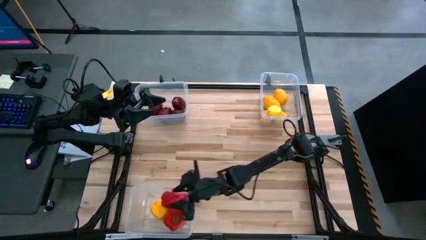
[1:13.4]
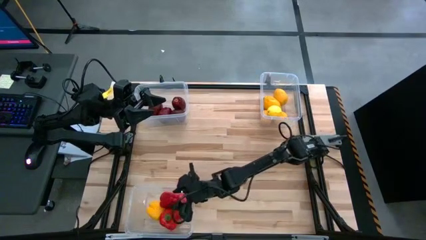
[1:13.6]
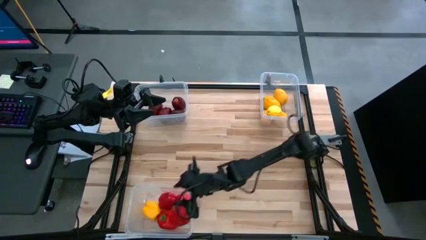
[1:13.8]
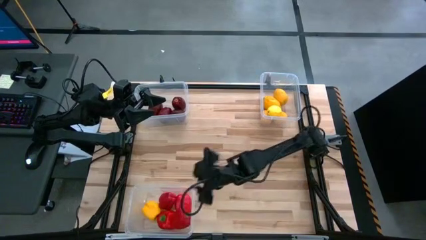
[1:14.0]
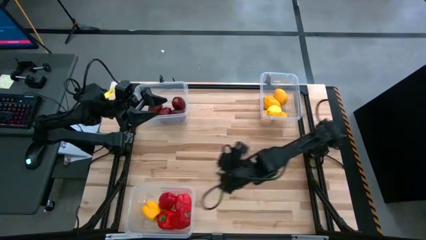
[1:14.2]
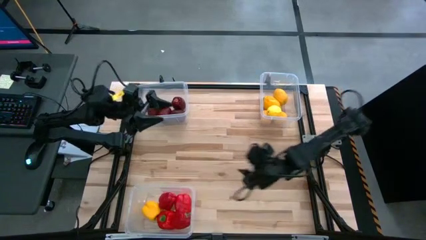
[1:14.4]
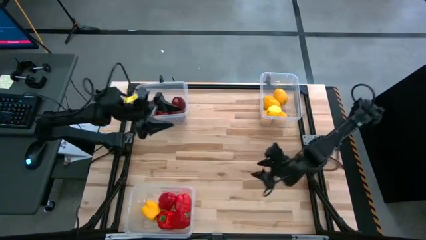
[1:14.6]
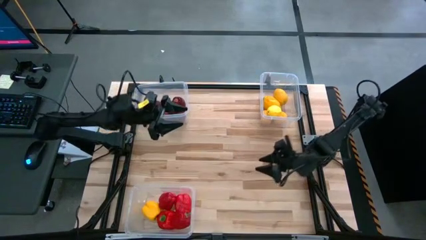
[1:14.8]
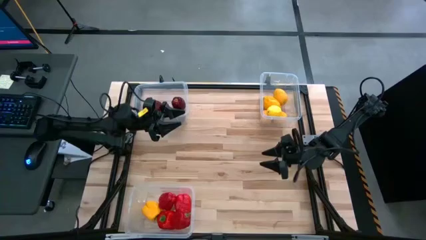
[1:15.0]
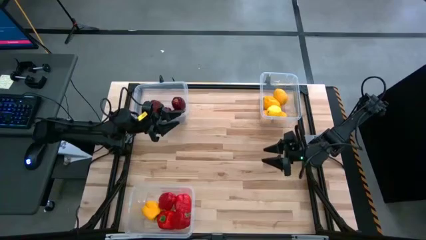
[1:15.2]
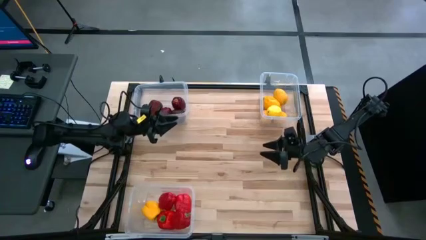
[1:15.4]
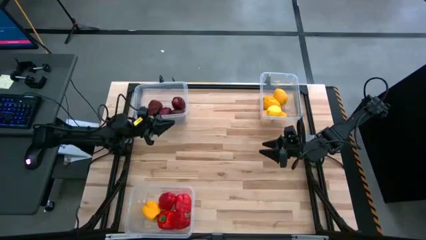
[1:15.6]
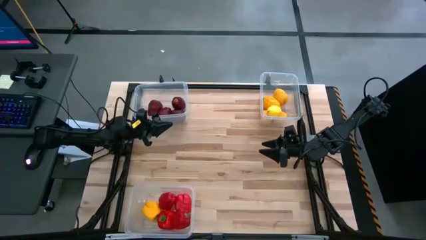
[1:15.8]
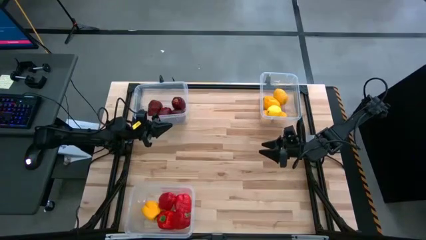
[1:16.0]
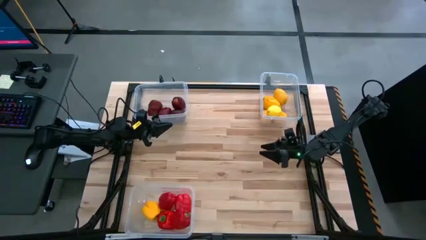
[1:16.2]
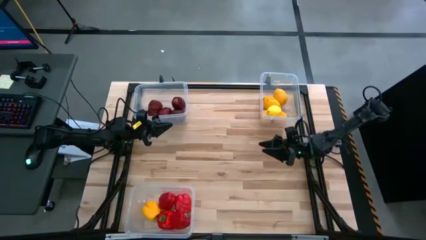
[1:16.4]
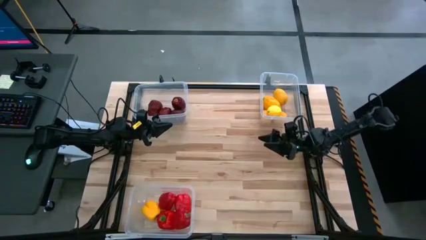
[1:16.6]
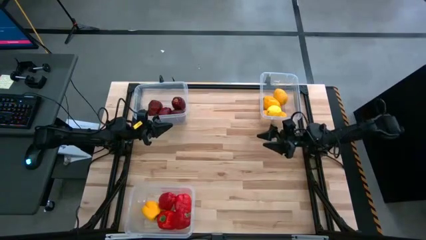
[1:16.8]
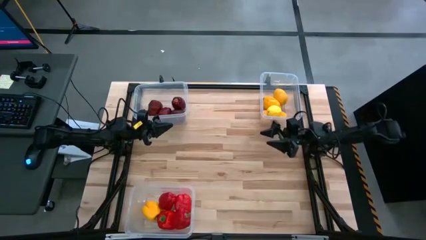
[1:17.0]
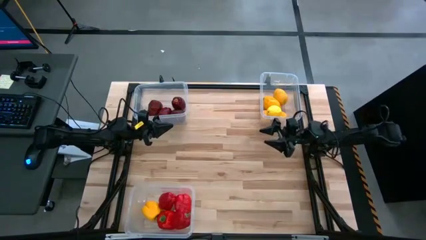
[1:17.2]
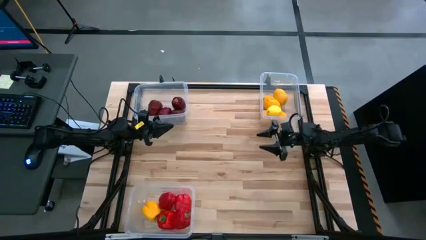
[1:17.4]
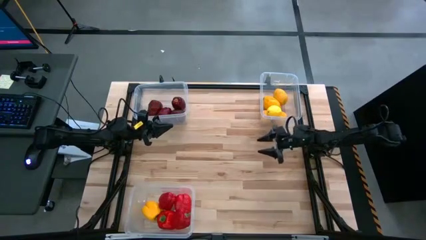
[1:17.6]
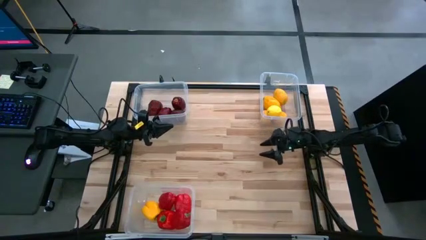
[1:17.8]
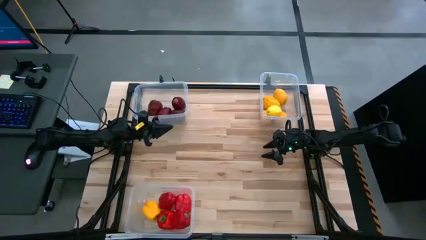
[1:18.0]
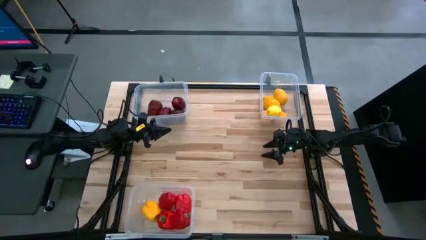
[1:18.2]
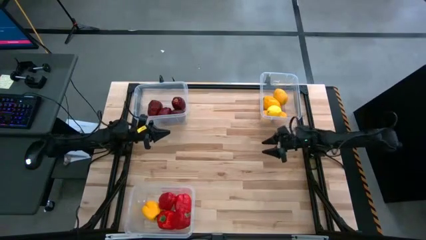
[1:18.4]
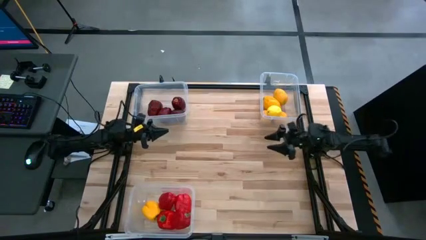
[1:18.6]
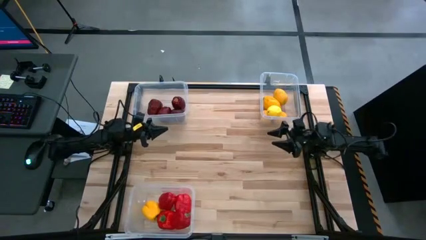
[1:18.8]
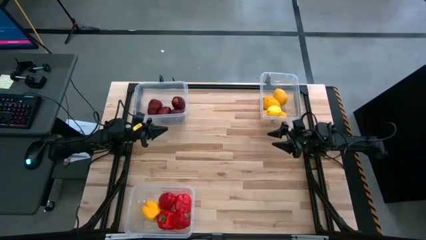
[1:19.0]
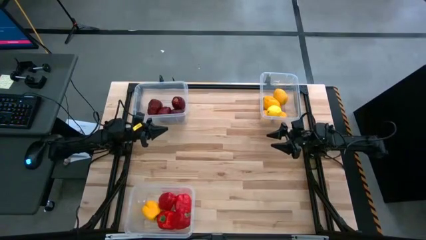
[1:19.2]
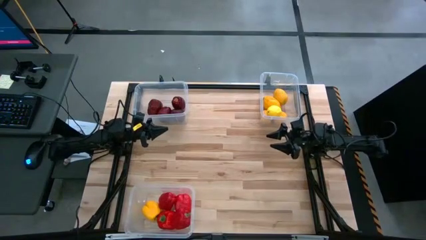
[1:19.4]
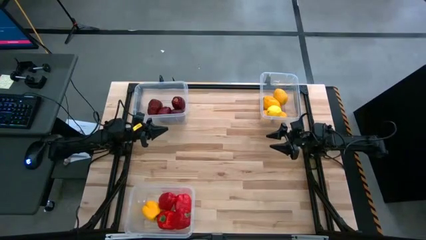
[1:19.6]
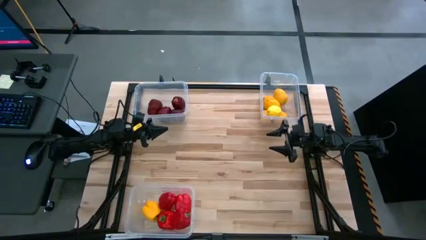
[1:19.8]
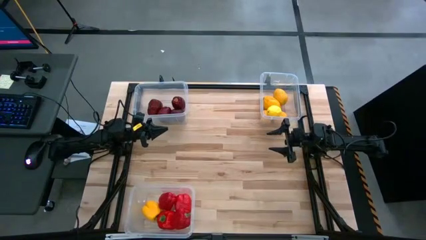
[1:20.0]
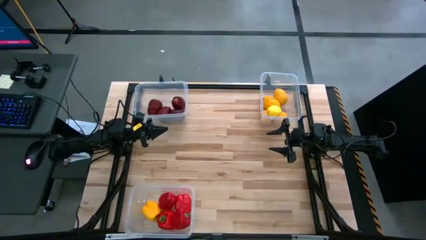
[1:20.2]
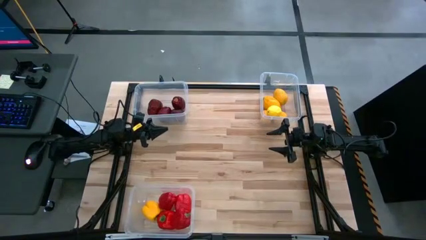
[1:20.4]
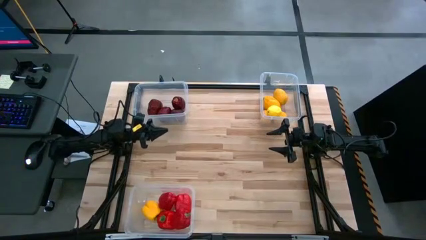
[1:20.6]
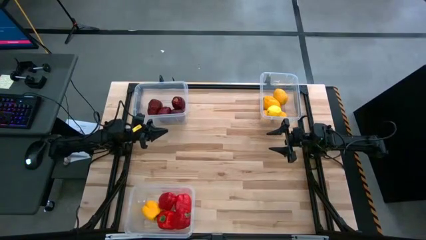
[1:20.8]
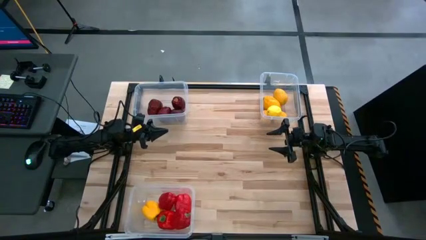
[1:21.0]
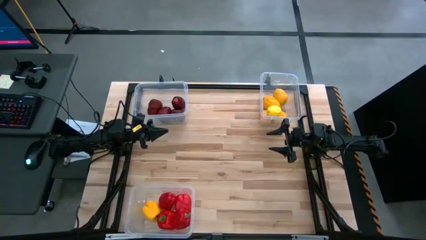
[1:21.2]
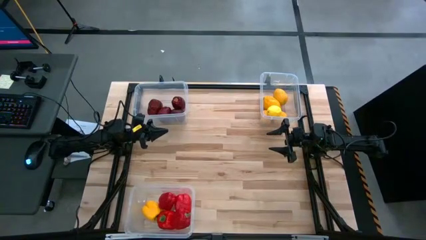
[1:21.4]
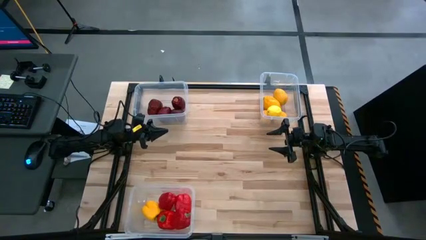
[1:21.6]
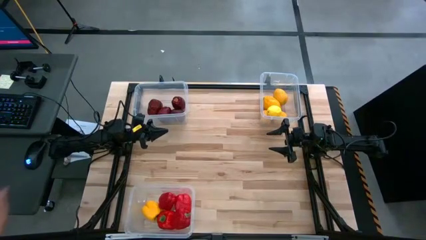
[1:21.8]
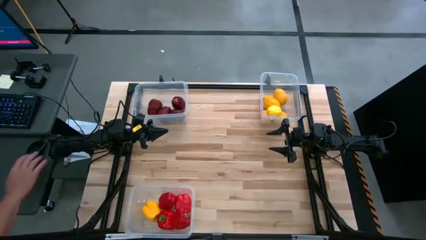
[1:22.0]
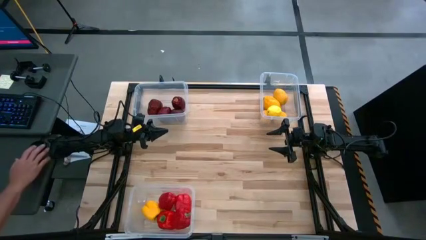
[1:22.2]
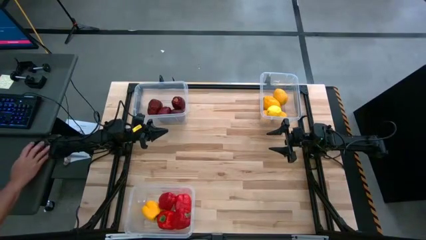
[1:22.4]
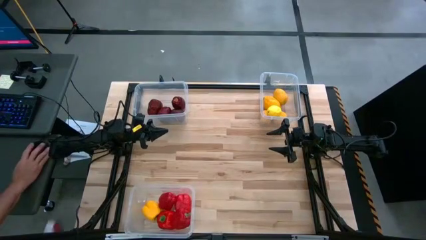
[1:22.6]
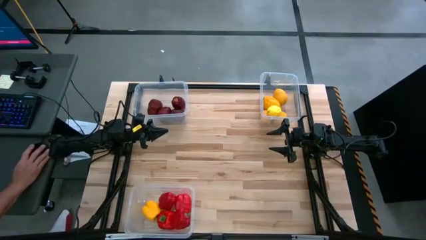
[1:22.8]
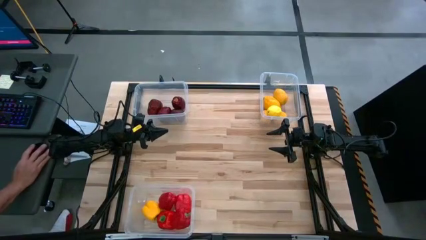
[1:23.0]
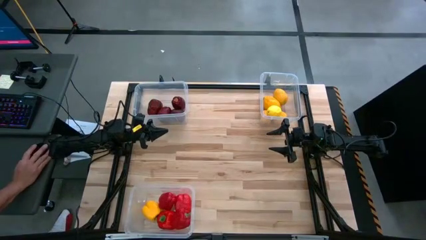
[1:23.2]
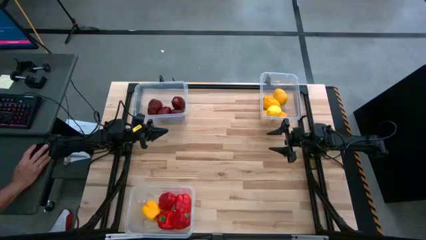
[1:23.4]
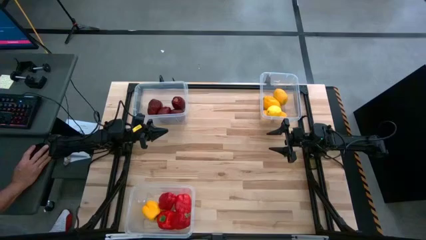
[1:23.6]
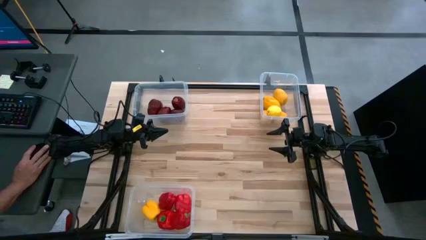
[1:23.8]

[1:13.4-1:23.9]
Task: Sort produce into baskets
Return to Home Position

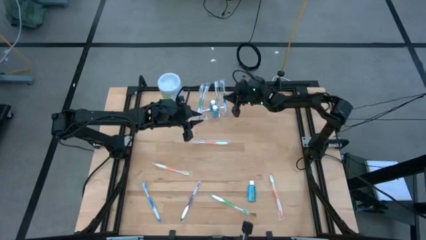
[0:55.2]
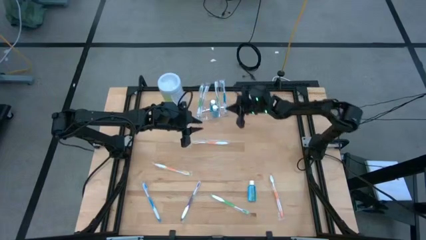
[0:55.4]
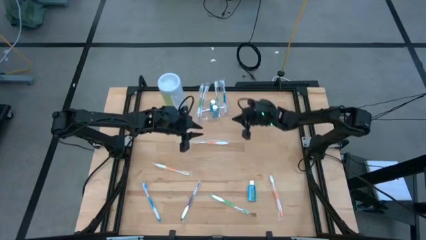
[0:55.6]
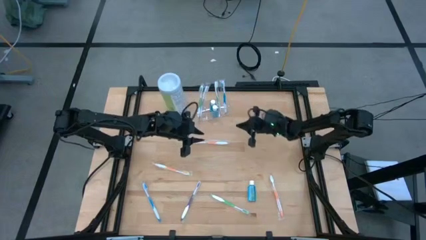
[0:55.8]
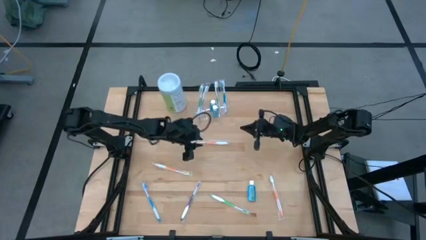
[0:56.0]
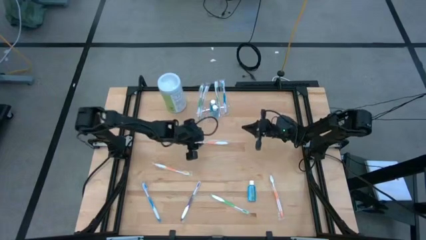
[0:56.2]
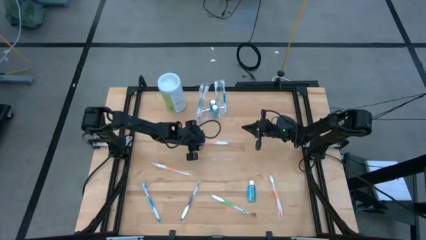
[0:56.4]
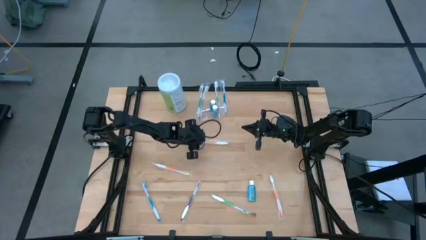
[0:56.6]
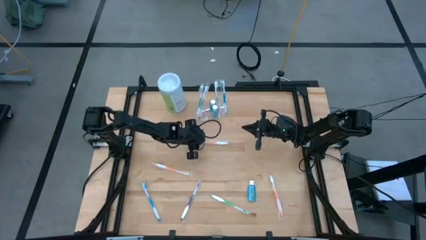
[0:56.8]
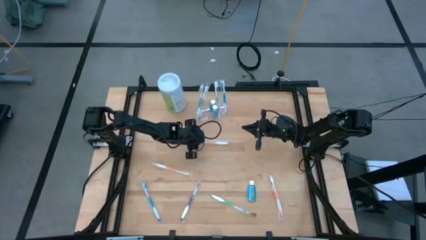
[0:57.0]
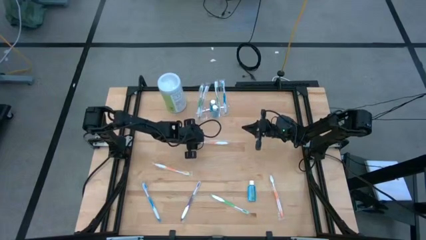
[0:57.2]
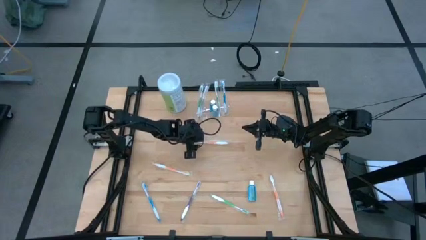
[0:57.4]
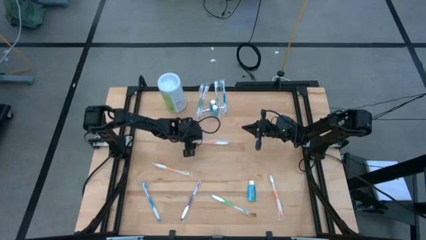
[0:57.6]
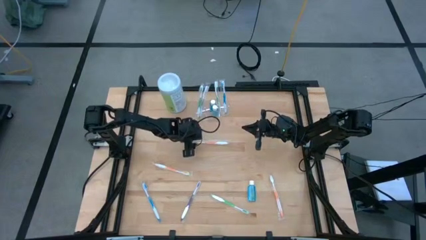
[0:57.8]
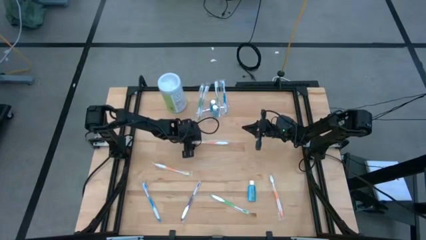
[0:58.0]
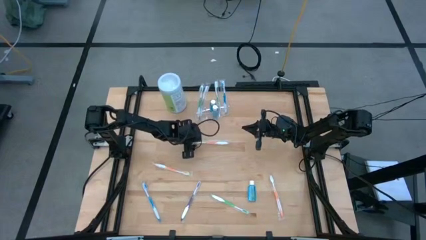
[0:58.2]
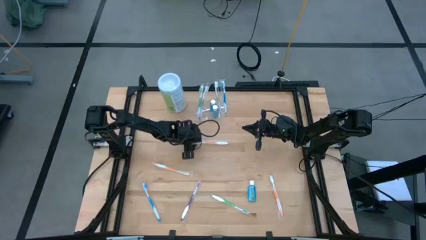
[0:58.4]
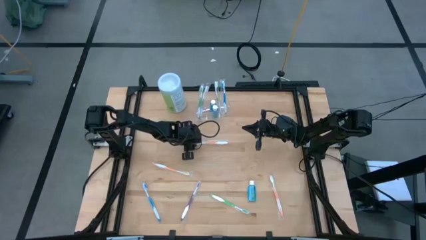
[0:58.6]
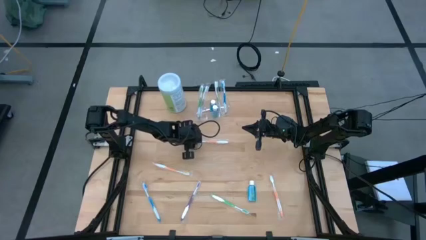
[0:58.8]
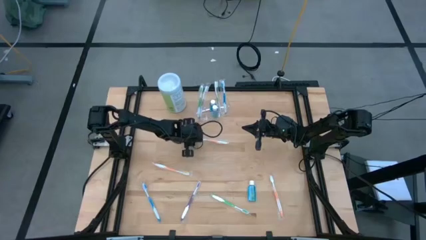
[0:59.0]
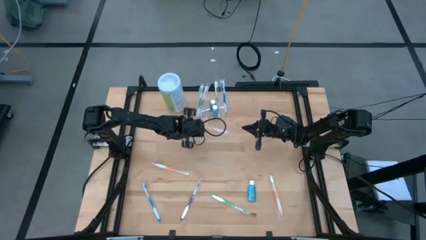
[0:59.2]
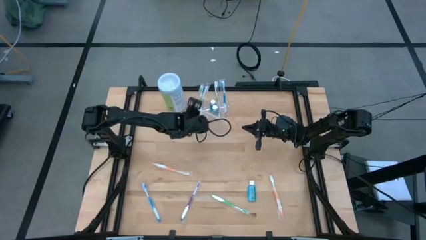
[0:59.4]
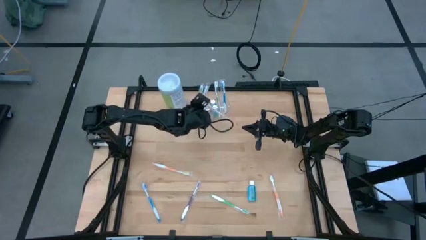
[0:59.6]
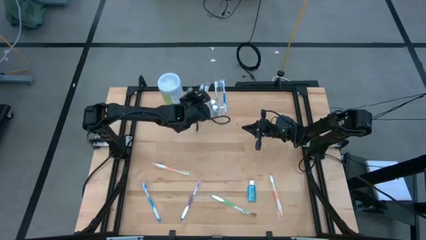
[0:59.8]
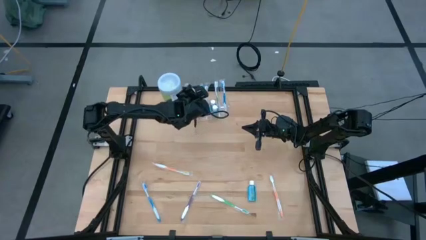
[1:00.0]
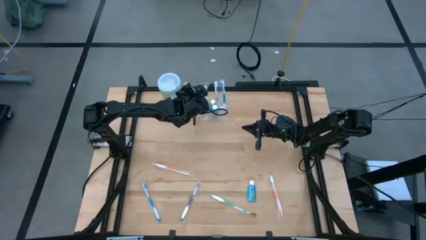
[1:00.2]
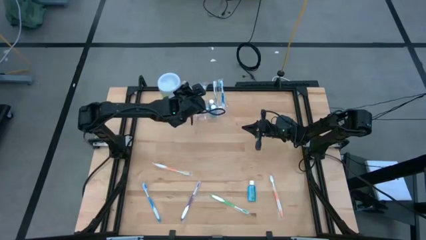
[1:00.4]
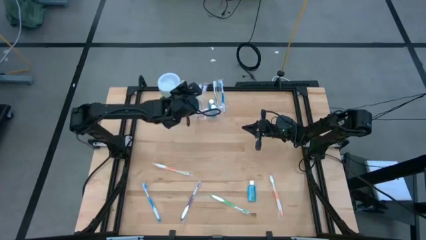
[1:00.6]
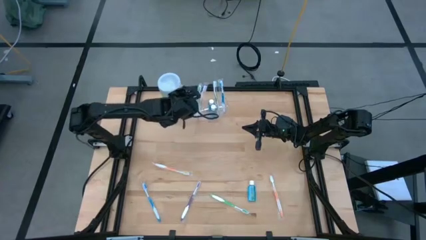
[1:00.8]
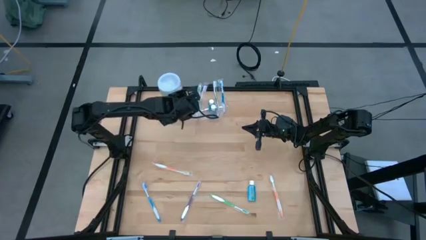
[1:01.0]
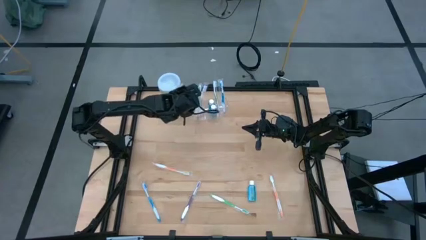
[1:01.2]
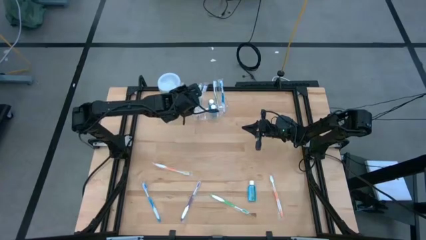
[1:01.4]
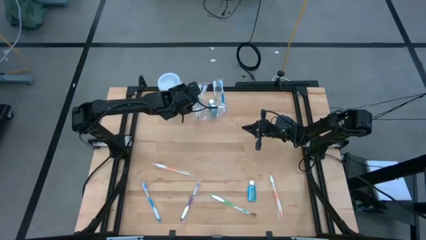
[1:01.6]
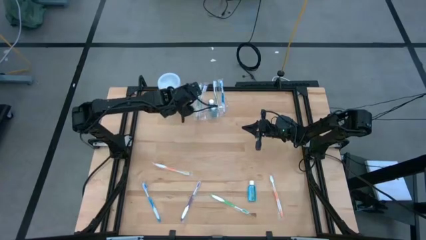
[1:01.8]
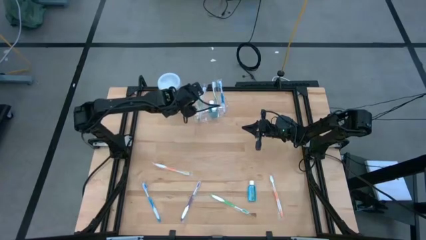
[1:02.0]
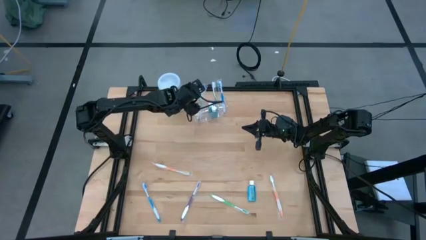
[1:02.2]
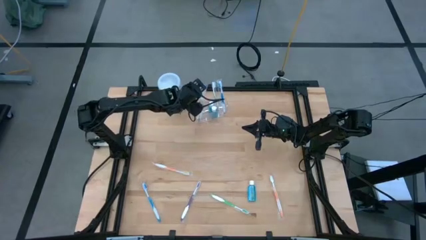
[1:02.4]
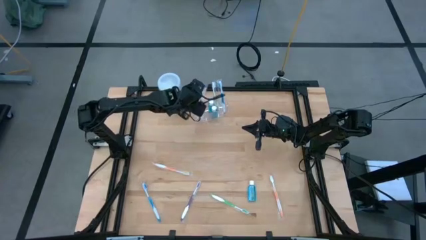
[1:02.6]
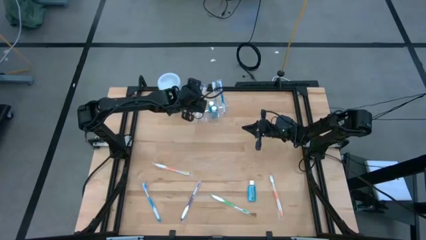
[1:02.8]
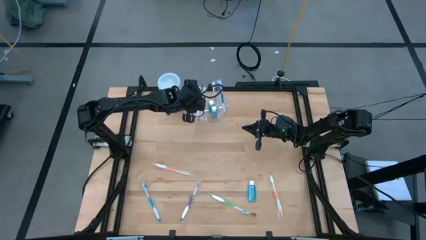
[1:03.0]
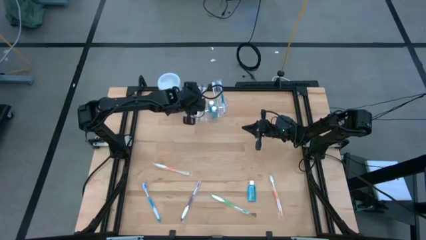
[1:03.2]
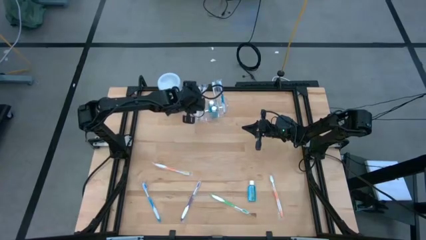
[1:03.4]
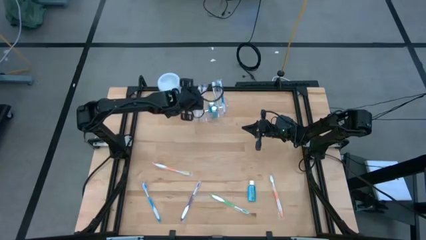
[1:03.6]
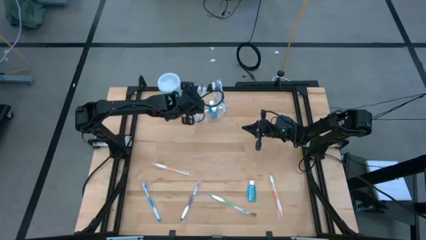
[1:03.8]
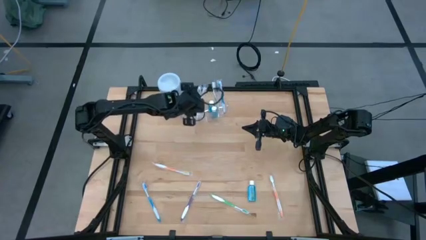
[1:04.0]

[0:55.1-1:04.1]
Task: Pick & Place toothbrushing station
Put the top orange toothbrush into the transparent organizer
